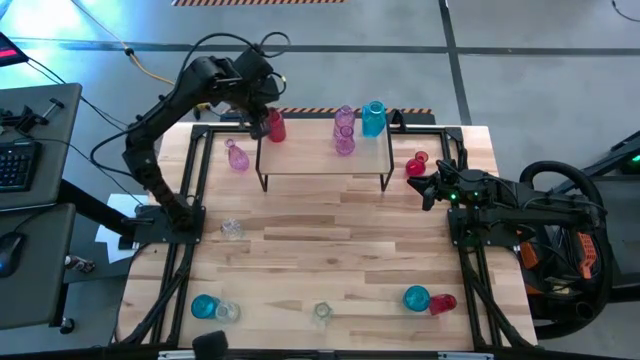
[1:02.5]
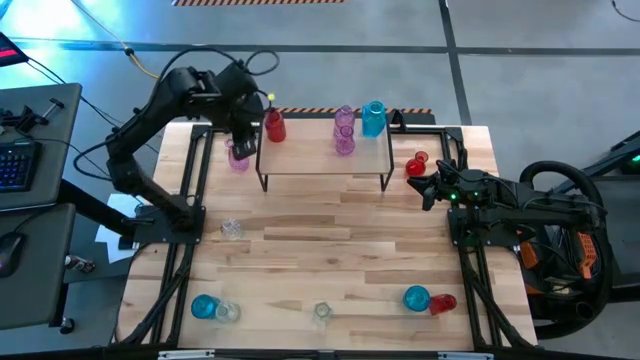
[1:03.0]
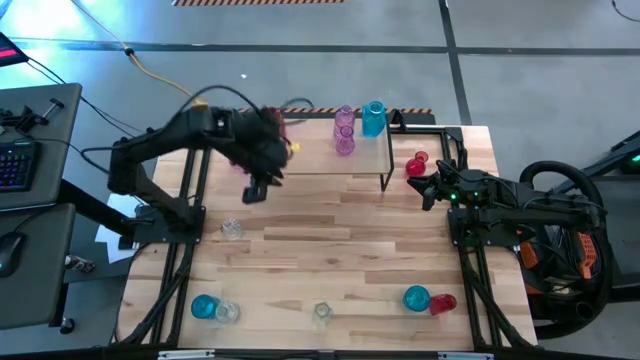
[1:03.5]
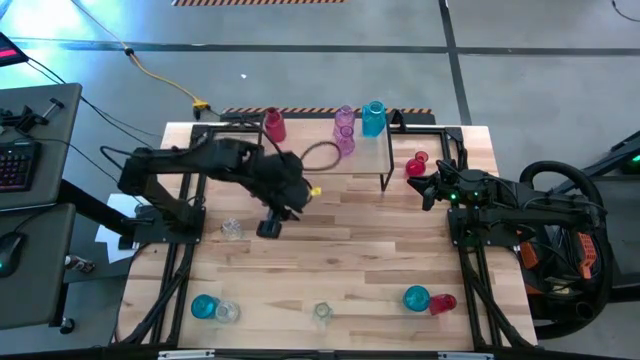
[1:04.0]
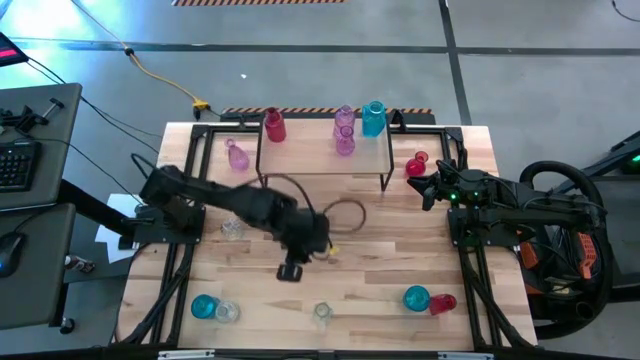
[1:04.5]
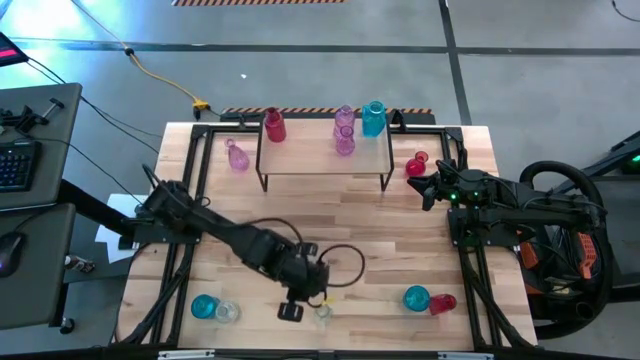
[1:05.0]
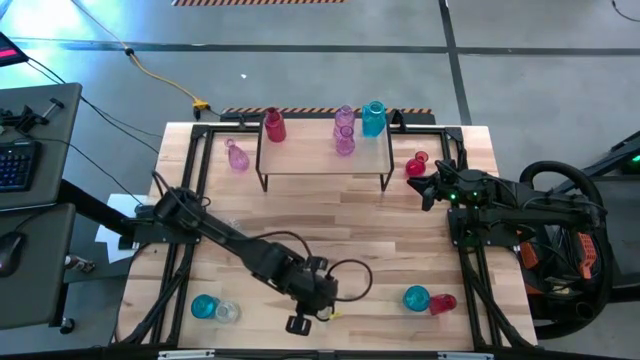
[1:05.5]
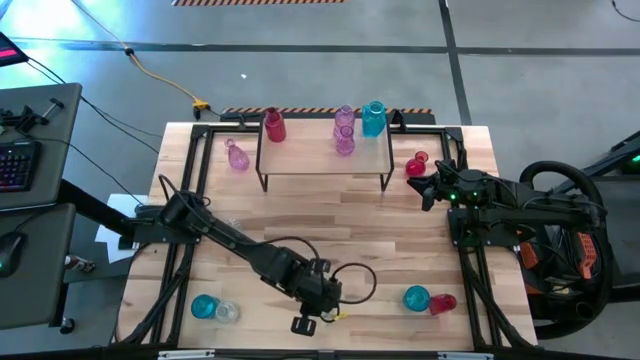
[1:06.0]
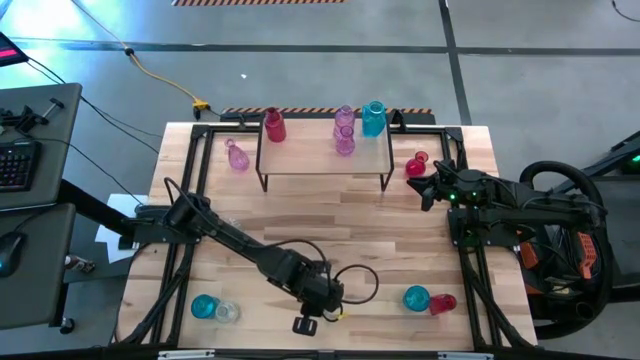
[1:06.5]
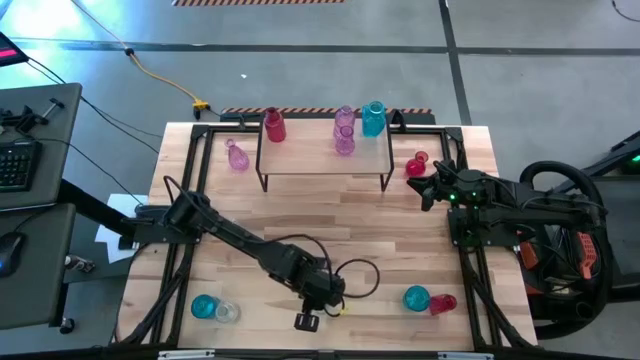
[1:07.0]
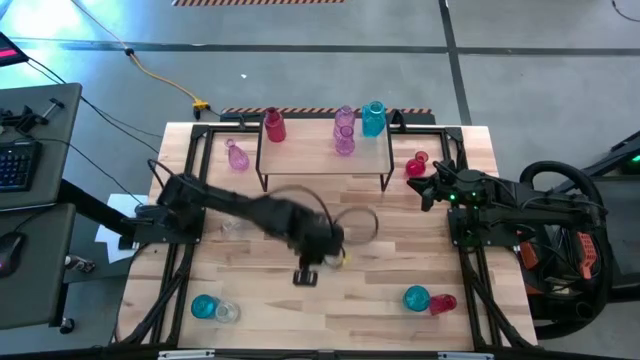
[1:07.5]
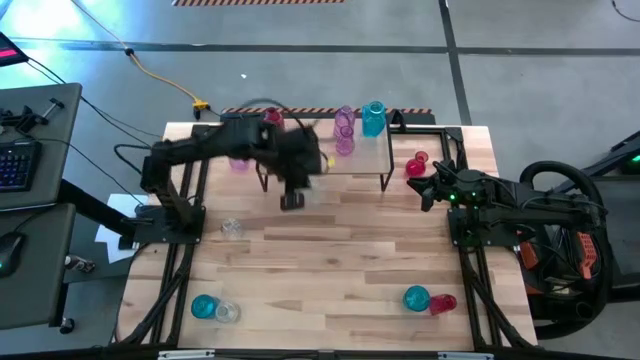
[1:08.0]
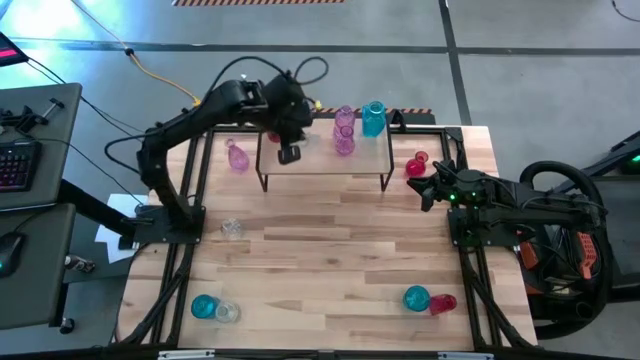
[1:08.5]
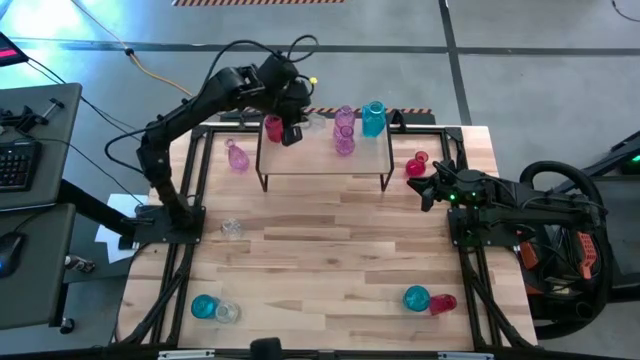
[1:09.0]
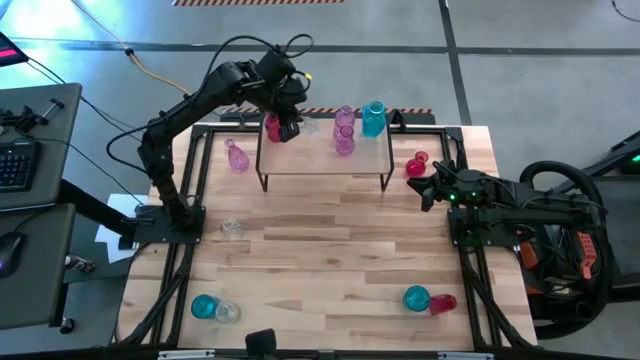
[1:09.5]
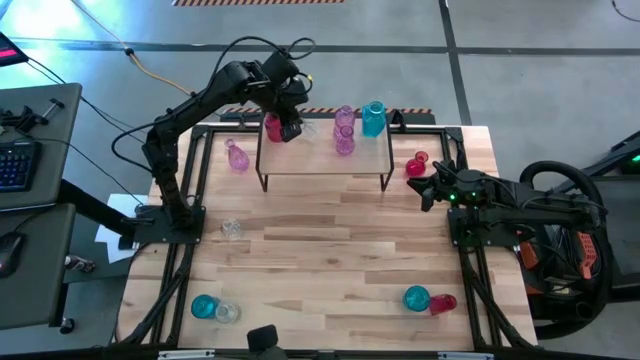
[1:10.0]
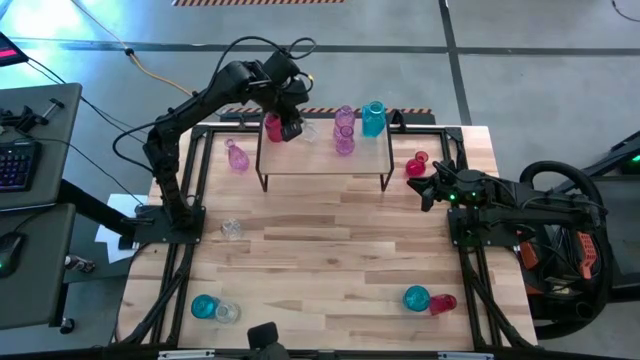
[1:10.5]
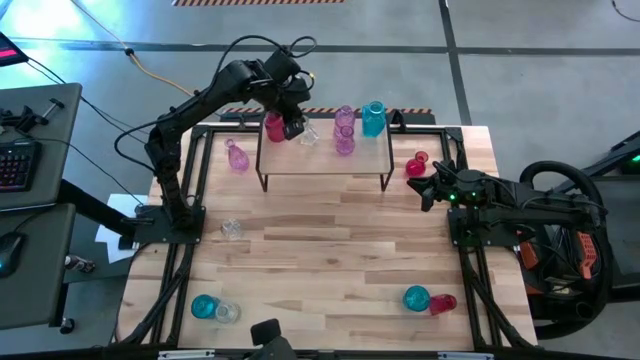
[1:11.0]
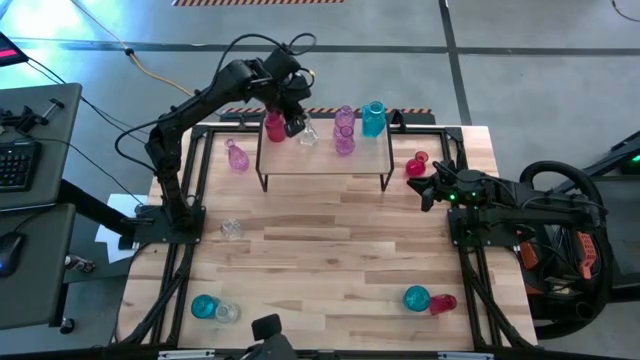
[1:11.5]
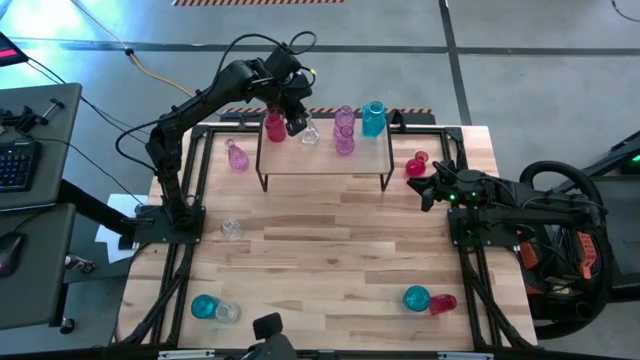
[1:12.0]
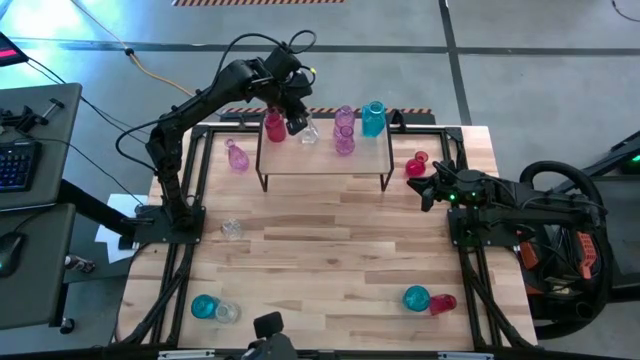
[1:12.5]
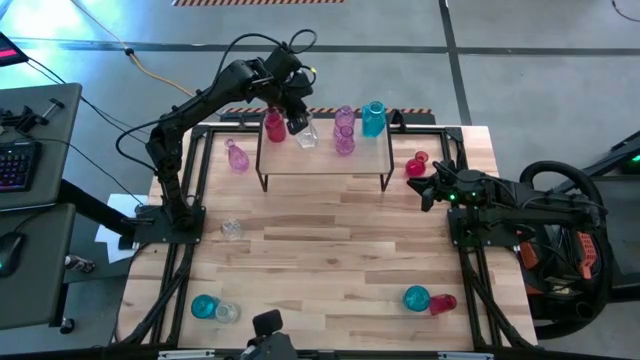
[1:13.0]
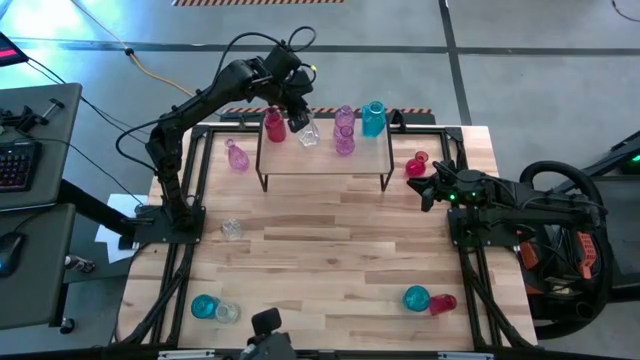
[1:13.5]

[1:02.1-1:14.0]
Task: sort vases onto shelf
Put the bottom right transparent vase on the shelf

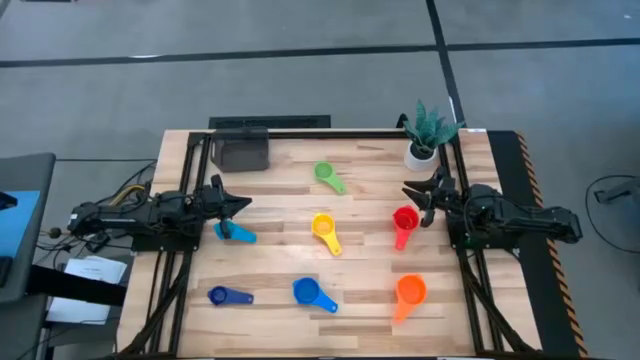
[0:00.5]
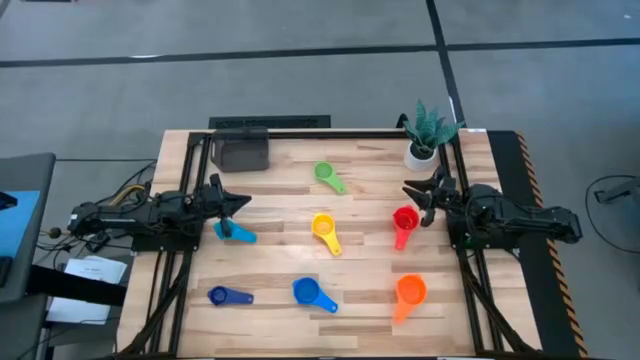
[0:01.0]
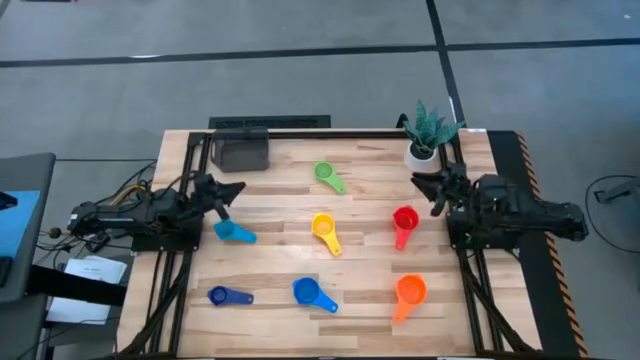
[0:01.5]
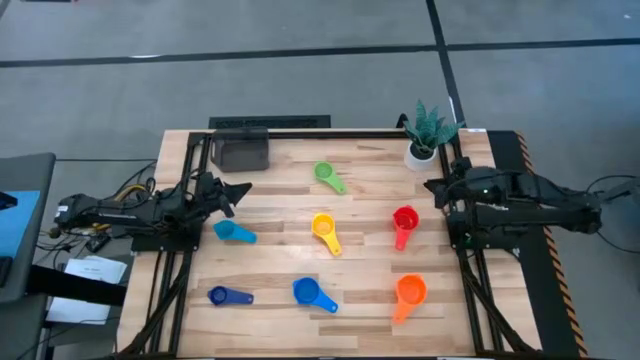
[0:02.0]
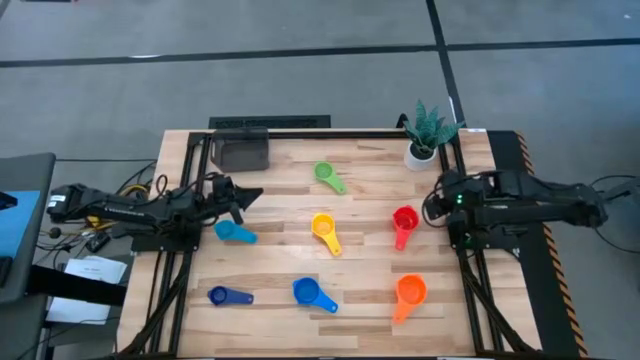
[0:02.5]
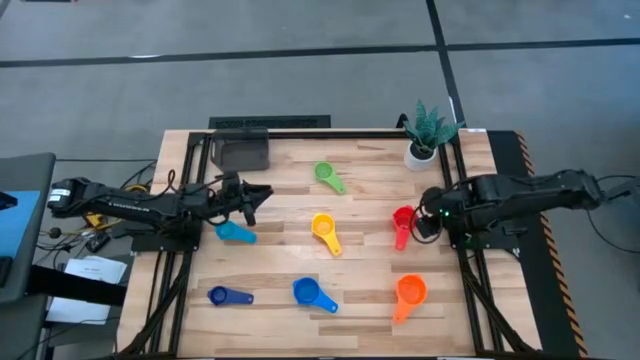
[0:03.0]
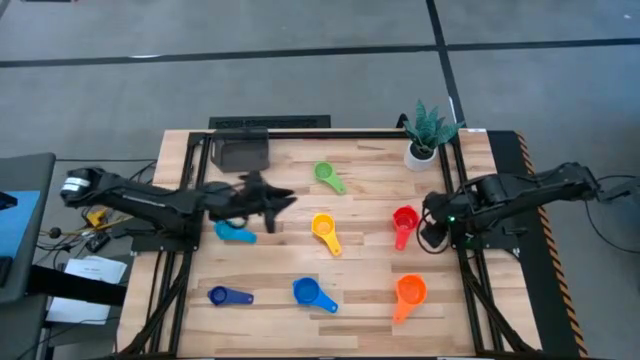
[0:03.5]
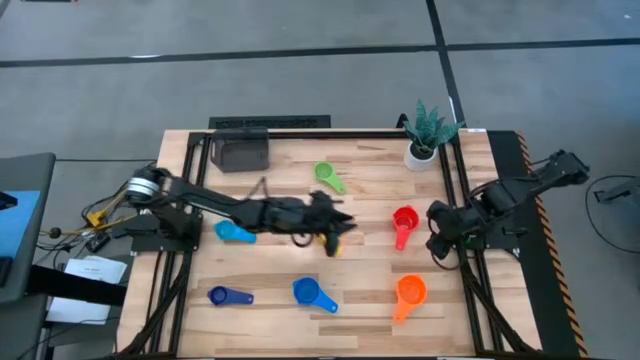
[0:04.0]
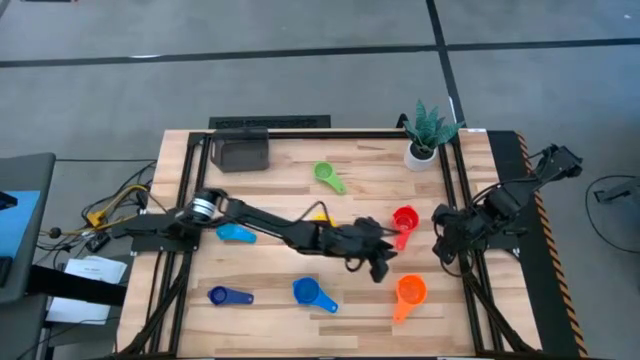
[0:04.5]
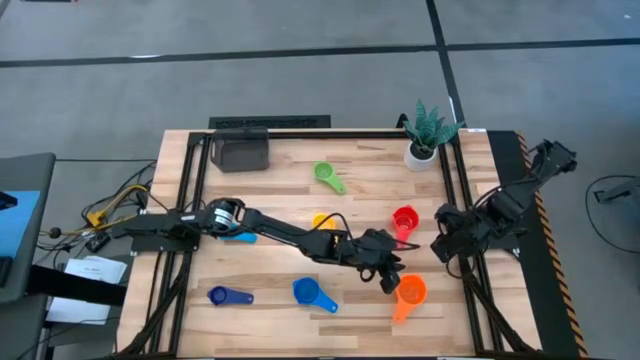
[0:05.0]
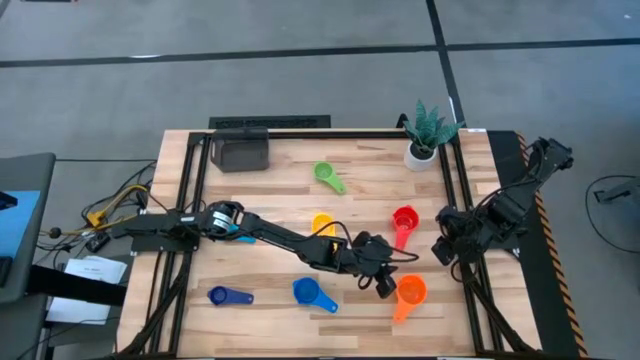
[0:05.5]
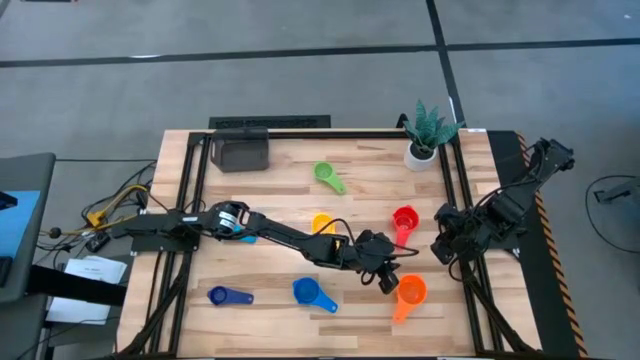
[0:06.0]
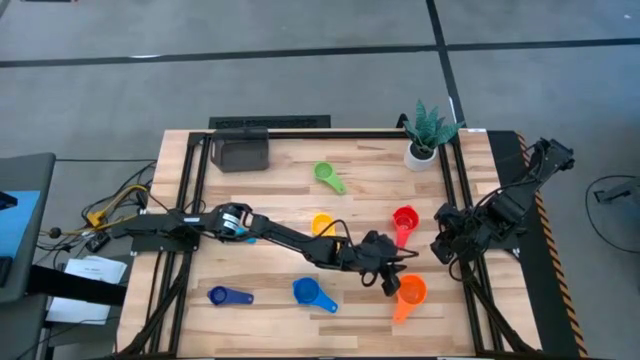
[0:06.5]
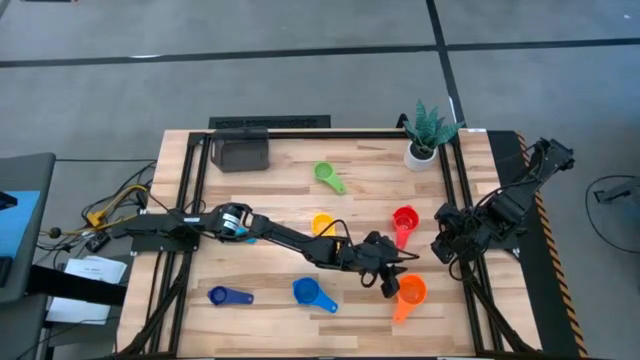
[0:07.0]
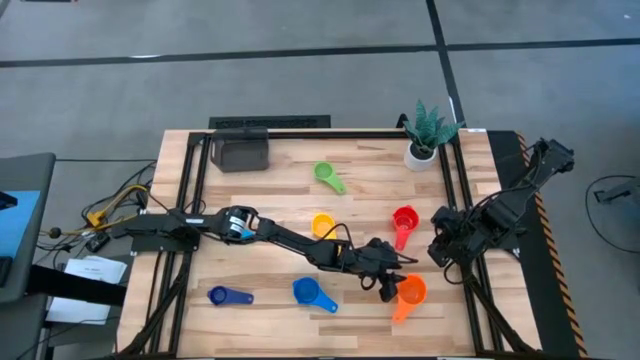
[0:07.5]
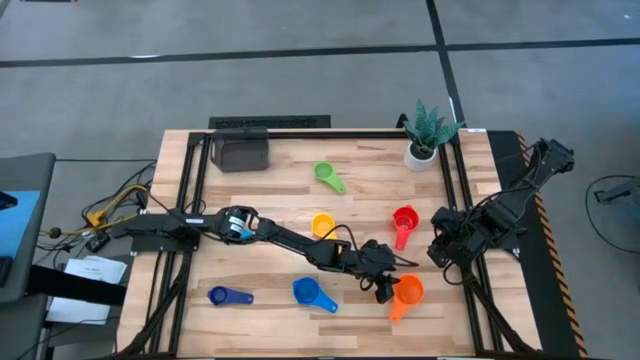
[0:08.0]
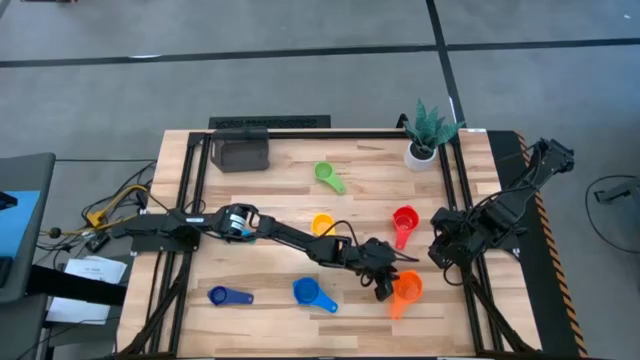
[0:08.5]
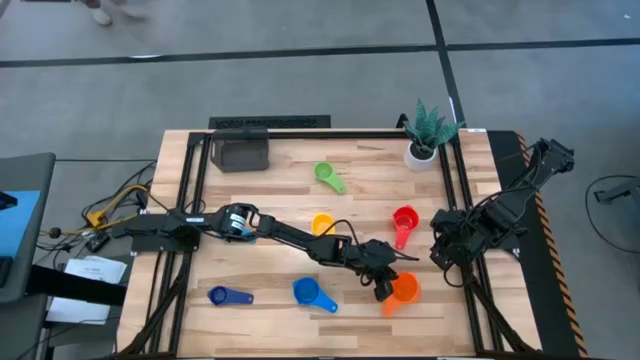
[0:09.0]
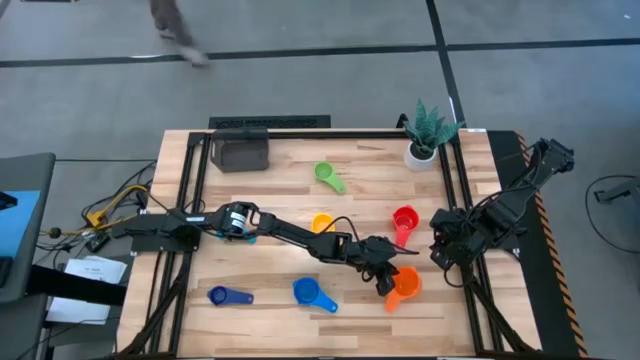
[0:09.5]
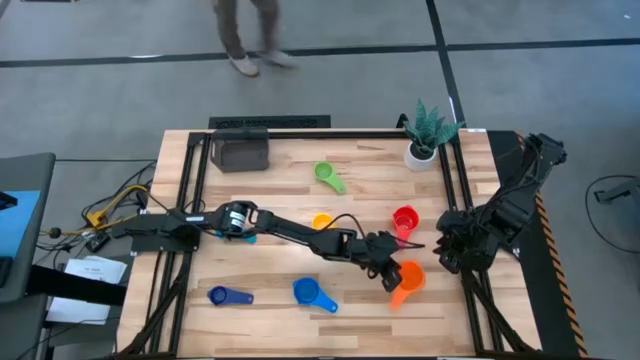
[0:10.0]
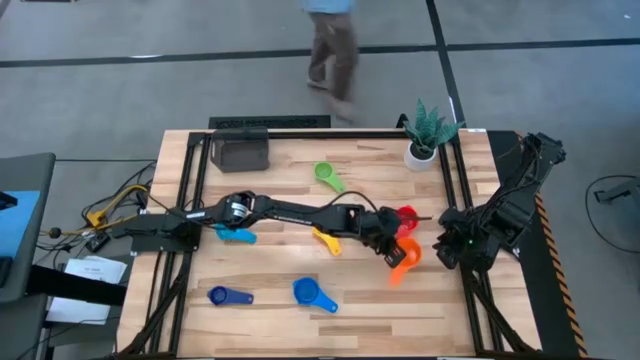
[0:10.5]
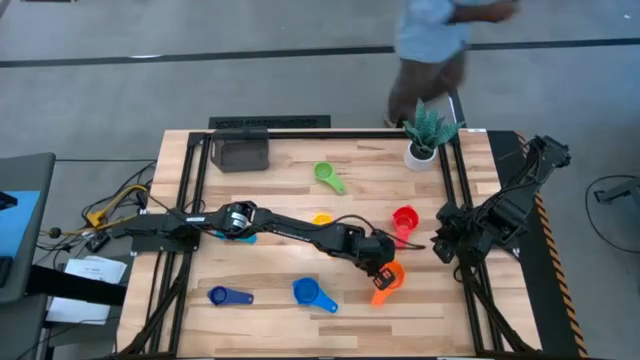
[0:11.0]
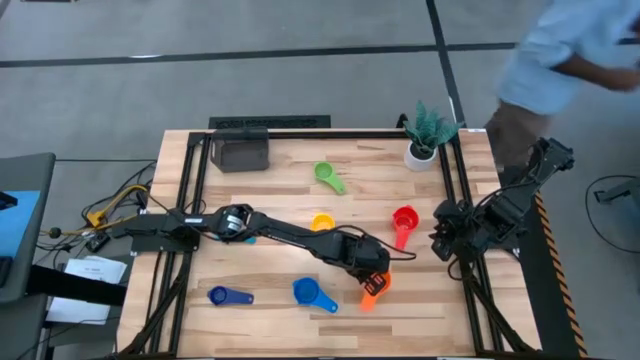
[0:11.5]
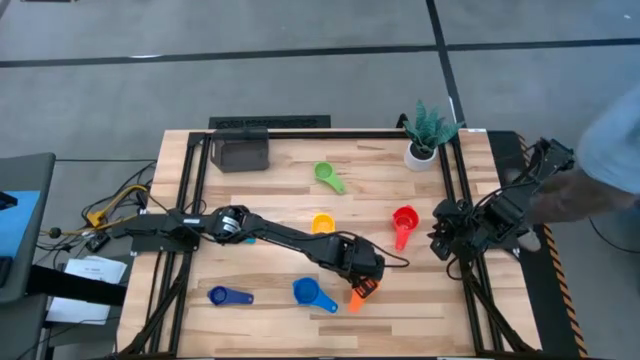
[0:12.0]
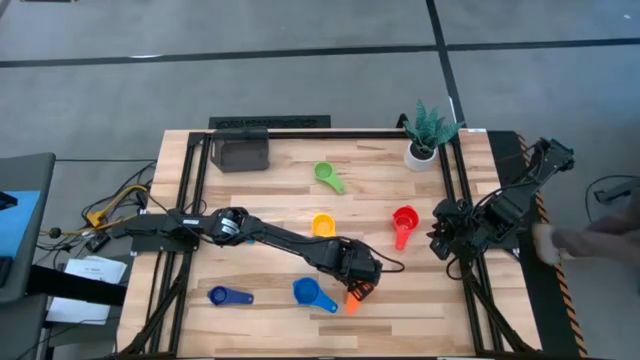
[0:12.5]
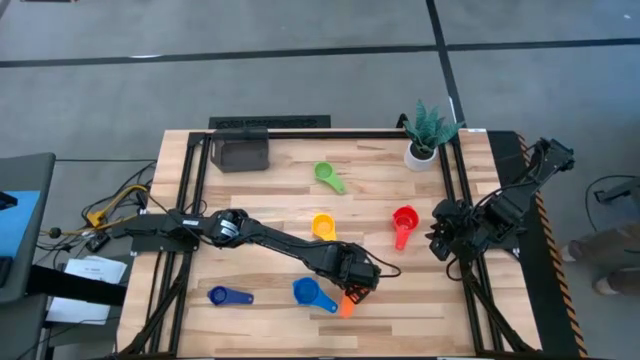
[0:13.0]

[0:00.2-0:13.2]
Task: Nest measuring cups in basket
Prepare the orange measuring cup
